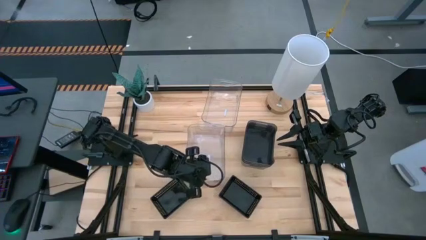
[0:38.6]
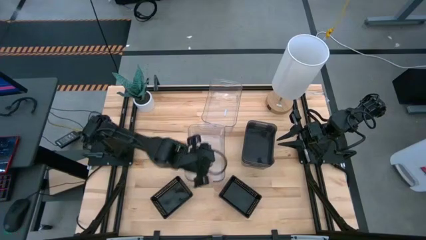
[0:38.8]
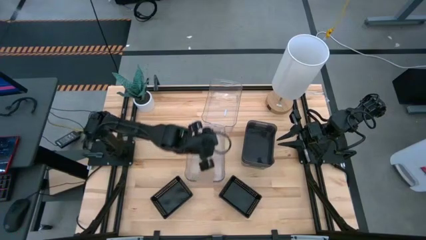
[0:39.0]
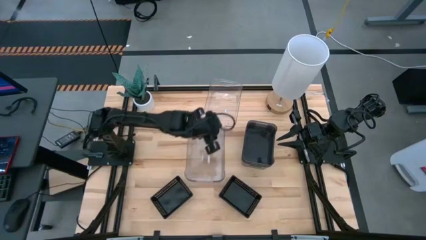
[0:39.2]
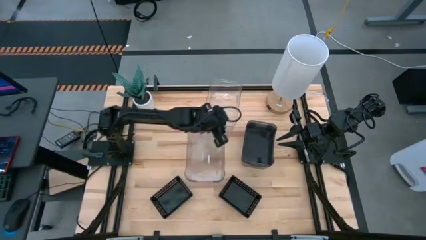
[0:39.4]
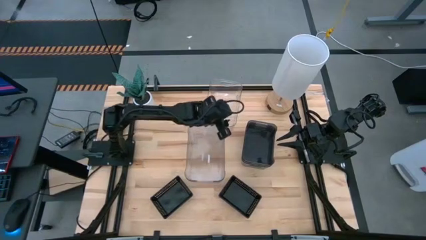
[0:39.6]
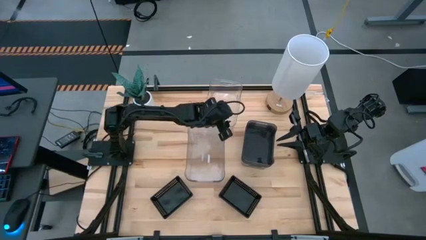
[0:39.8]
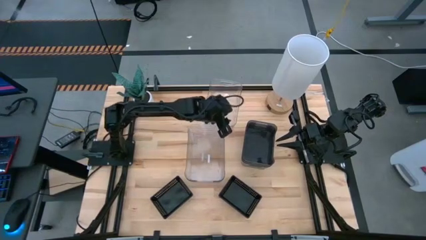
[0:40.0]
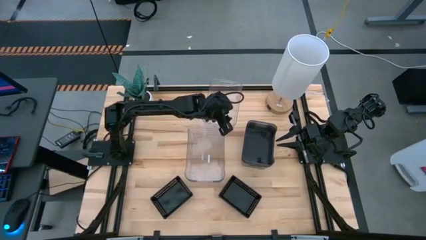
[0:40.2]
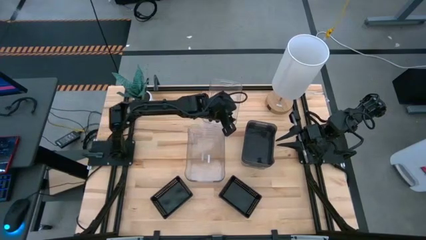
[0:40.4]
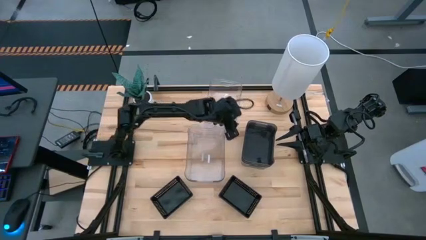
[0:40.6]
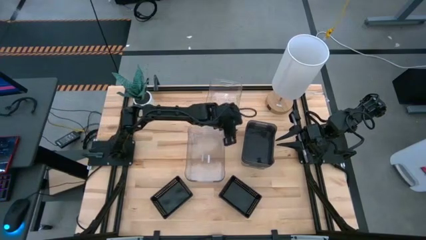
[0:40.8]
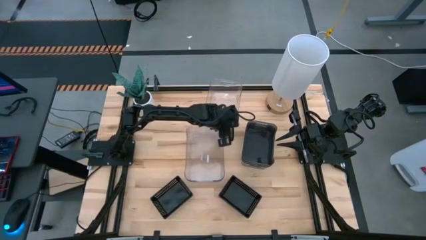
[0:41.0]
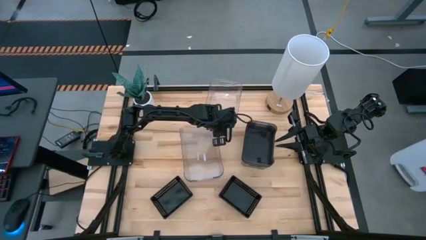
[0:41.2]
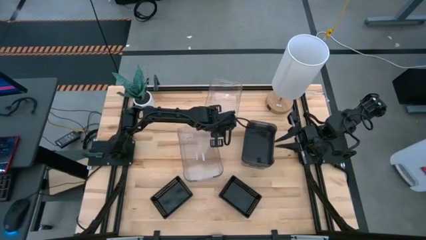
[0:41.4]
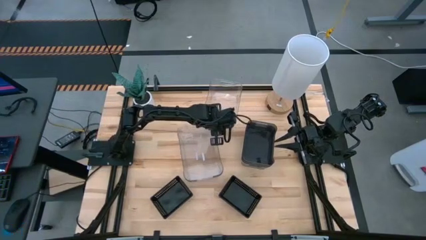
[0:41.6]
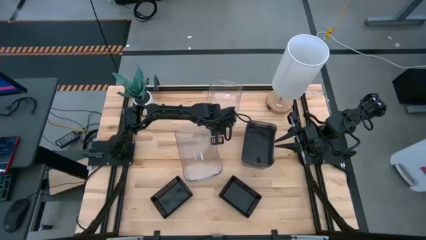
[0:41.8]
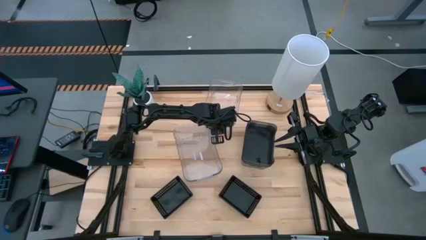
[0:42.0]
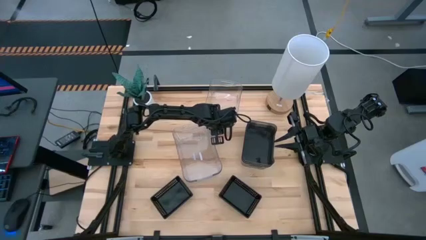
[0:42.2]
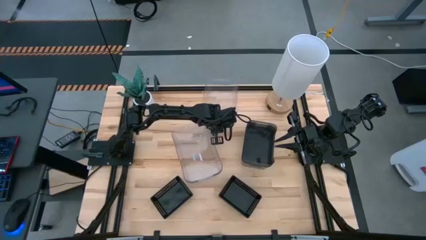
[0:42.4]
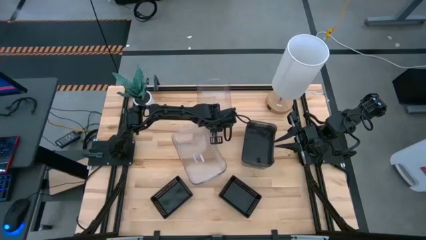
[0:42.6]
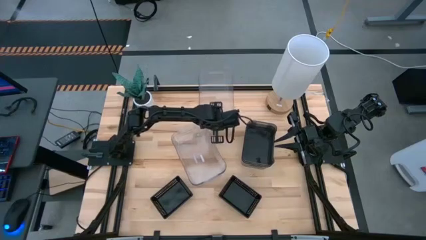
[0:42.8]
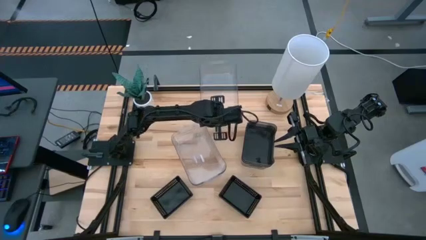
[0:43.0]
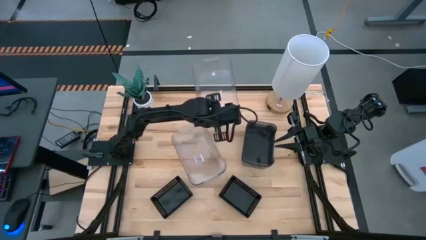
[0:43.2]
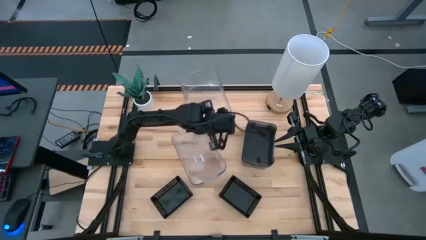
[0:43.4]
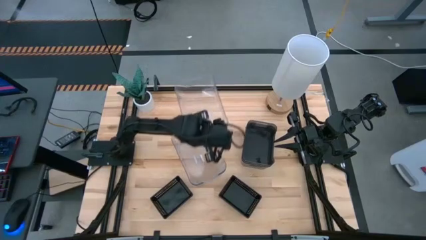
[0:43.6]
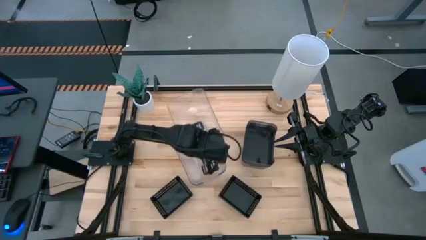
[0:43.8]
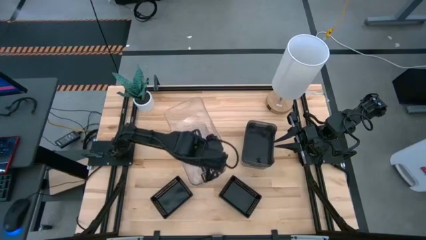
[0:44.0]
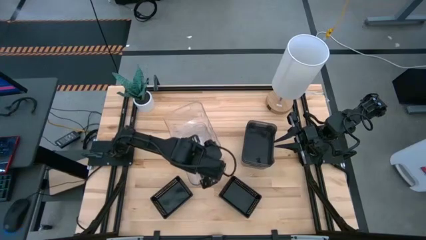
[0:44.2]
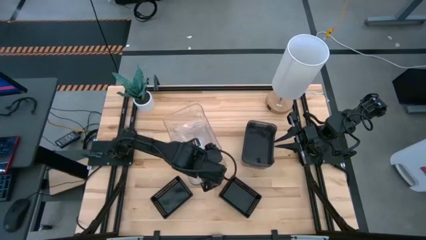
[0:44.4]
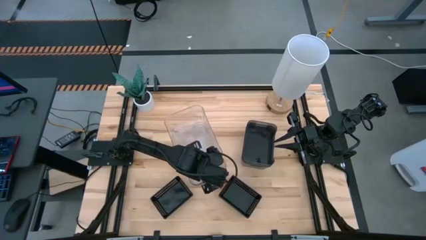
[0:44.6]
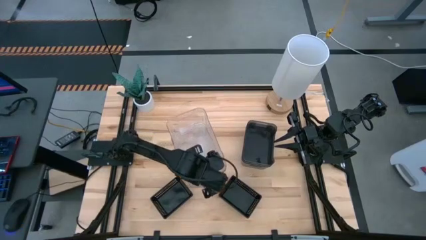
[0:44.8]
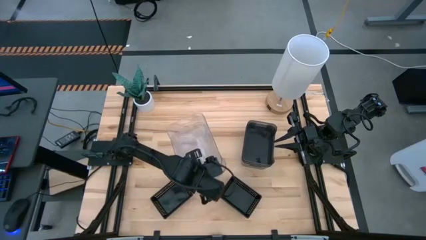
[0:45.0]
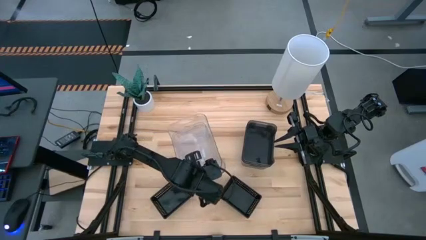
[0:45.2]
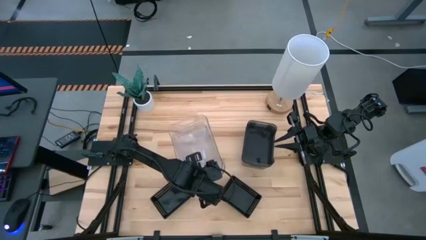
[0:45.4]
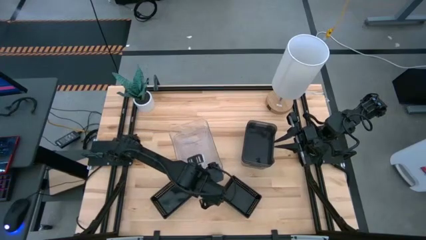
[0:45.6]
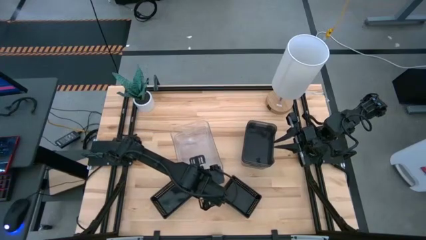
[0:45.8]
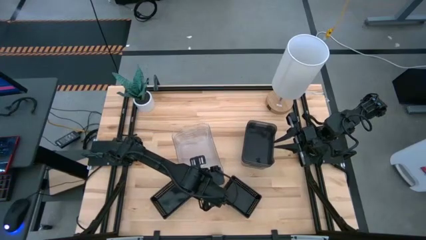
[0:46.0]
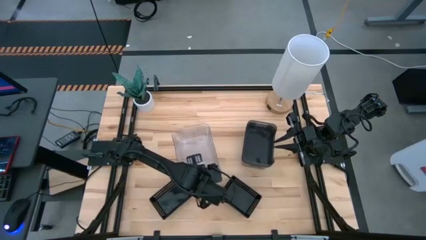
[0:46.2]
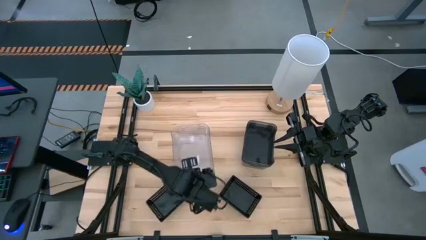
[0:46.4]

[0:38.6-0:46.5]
Stack the top transparent bin on top of the bottom transparent bin

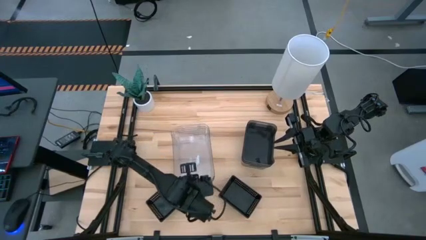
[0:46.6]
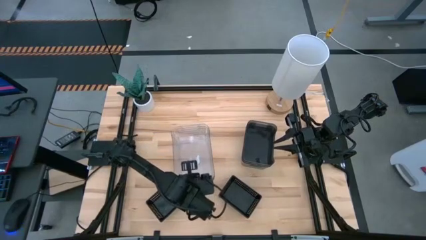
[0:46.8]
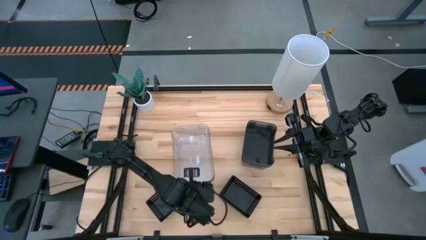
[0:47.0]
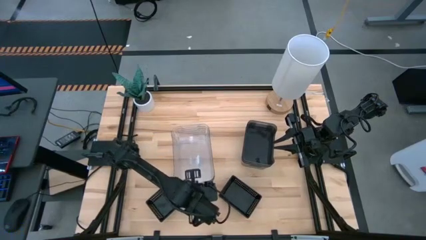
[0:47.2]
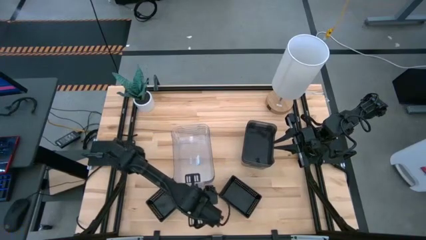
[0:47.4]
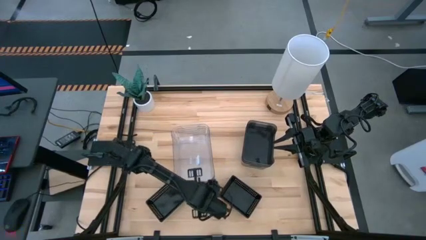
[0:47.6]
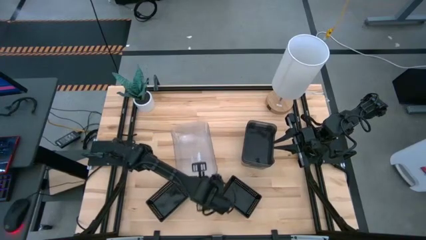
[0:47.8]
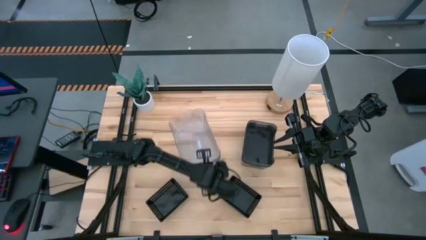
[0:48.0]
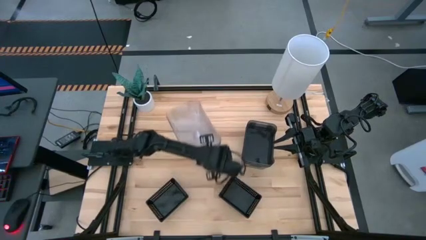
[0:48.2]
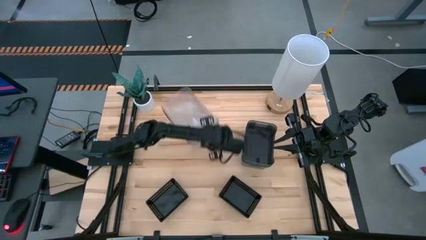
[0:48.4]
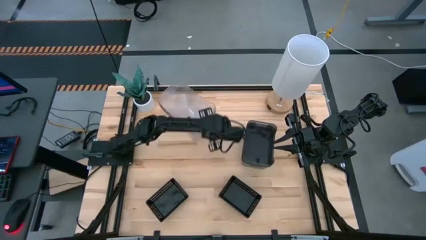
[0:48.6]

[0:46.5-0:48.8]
Adjust the transparent bins

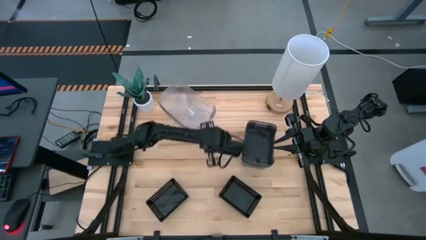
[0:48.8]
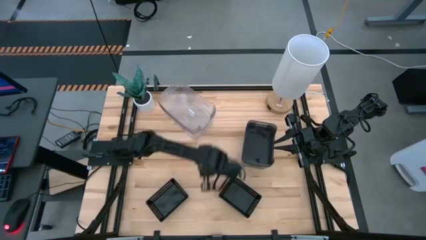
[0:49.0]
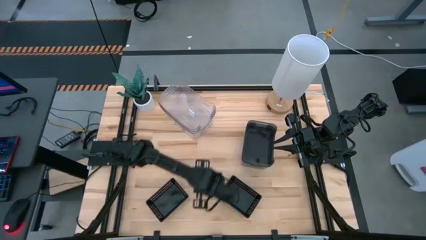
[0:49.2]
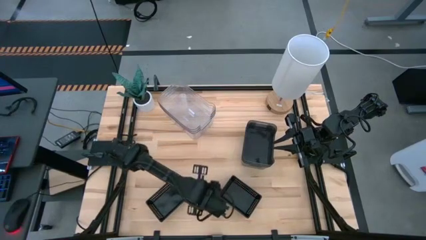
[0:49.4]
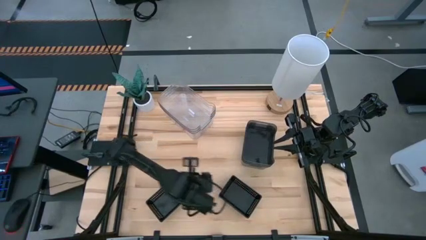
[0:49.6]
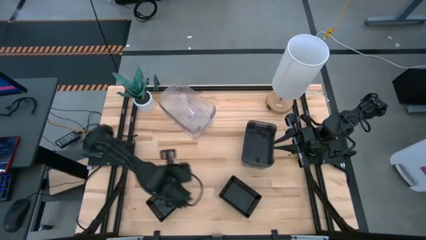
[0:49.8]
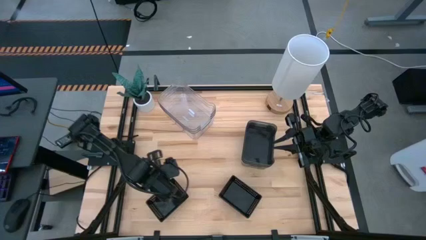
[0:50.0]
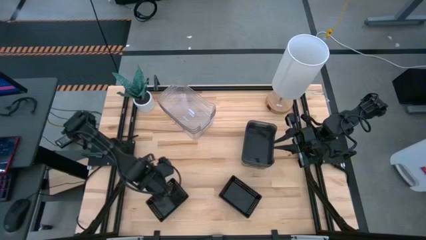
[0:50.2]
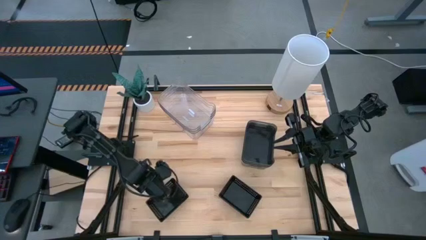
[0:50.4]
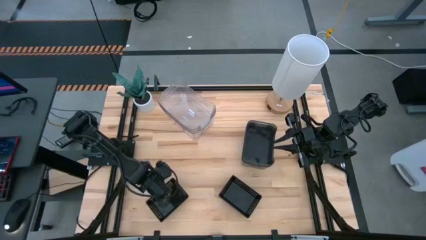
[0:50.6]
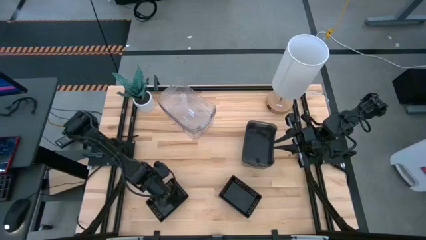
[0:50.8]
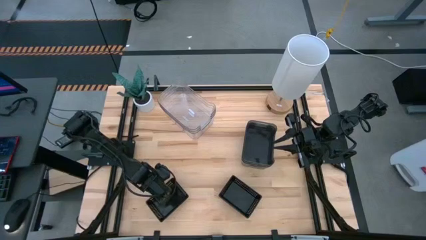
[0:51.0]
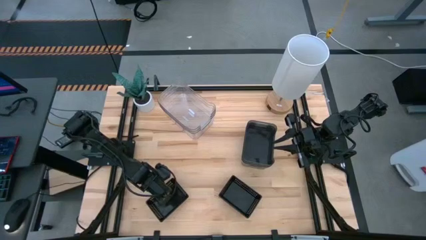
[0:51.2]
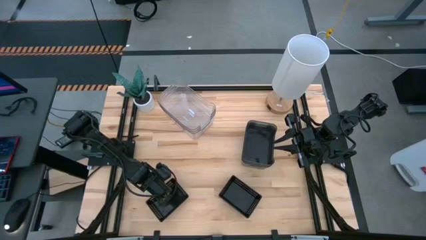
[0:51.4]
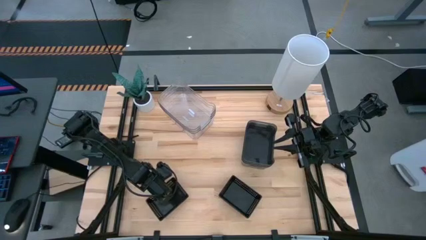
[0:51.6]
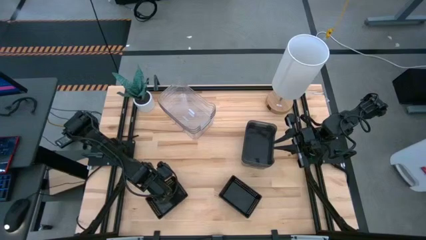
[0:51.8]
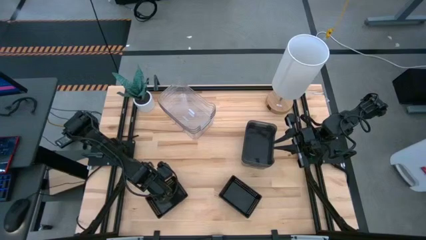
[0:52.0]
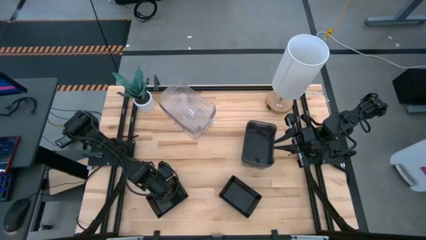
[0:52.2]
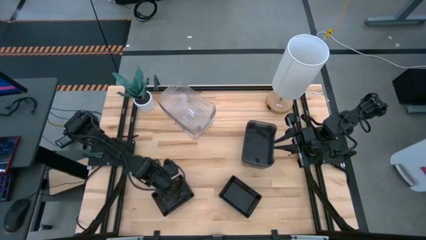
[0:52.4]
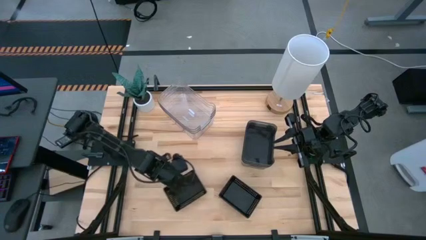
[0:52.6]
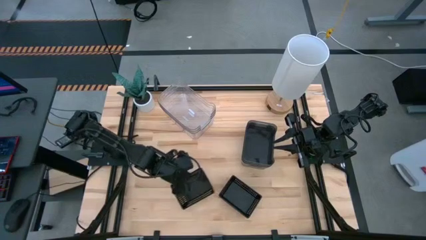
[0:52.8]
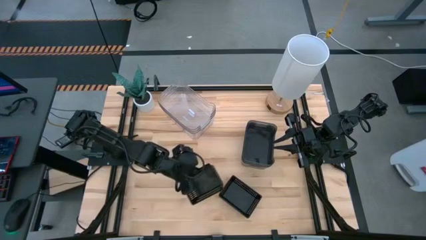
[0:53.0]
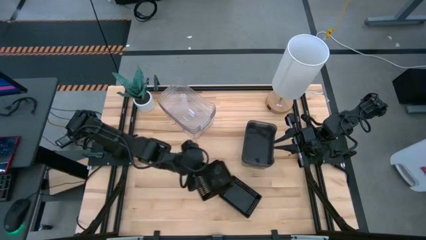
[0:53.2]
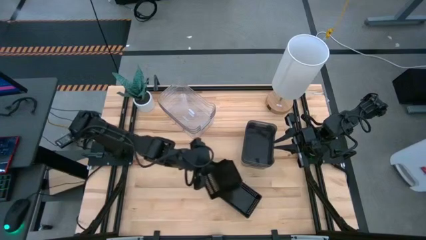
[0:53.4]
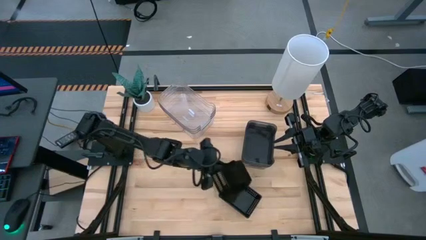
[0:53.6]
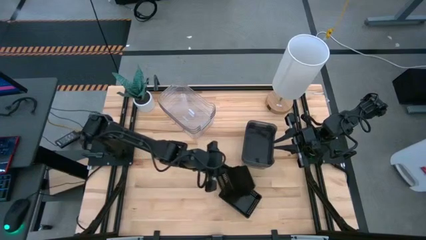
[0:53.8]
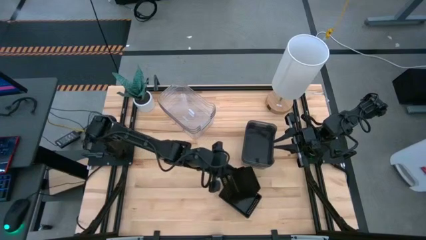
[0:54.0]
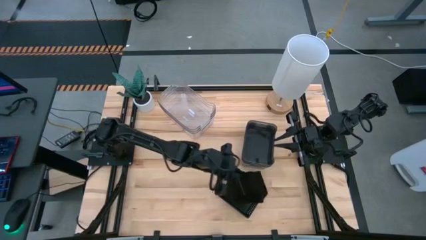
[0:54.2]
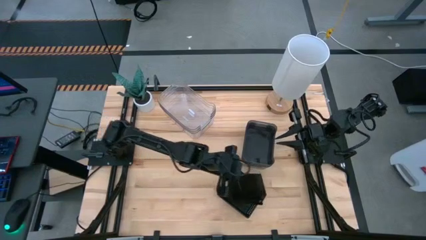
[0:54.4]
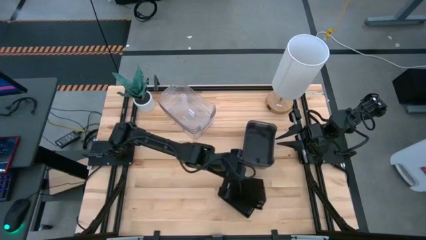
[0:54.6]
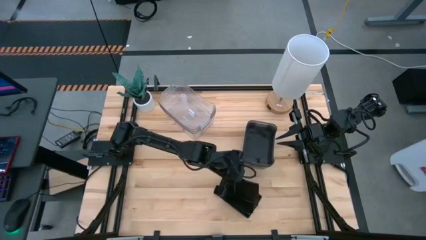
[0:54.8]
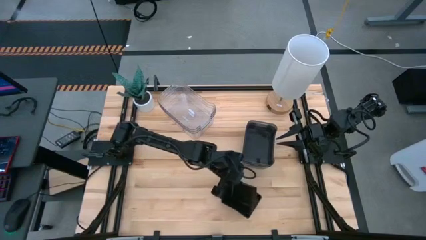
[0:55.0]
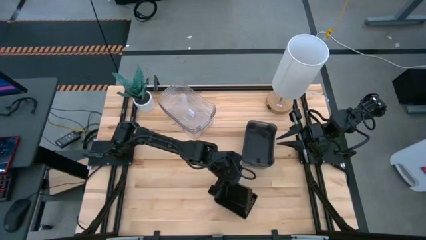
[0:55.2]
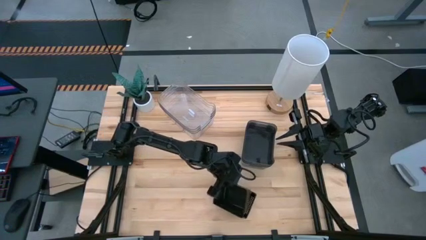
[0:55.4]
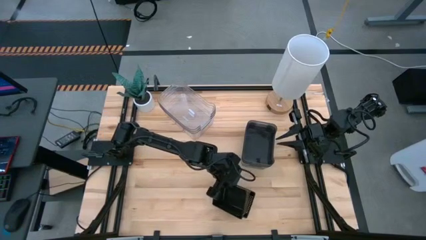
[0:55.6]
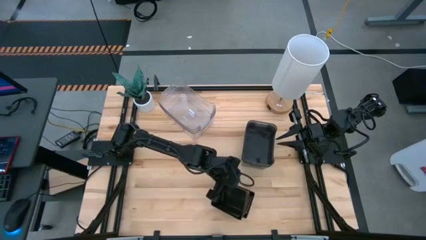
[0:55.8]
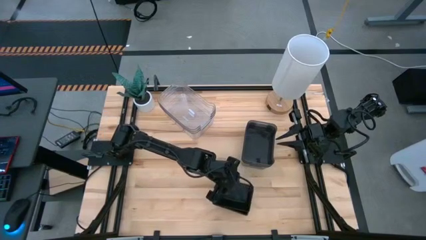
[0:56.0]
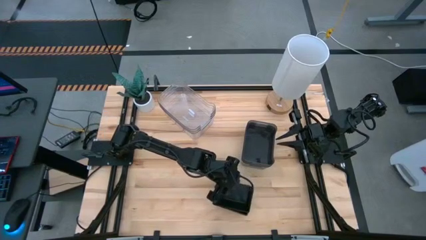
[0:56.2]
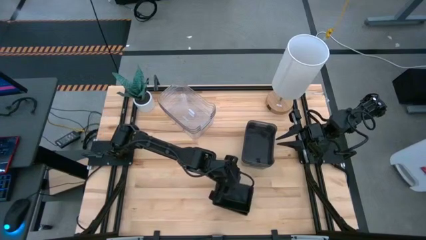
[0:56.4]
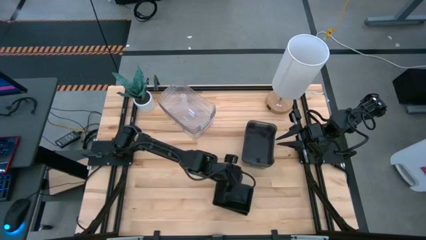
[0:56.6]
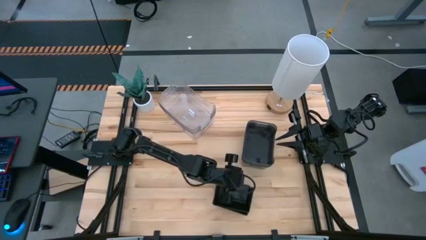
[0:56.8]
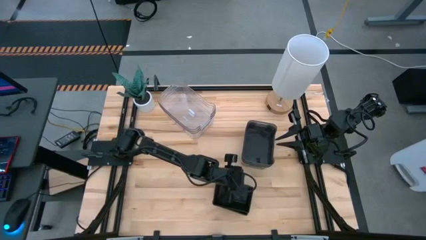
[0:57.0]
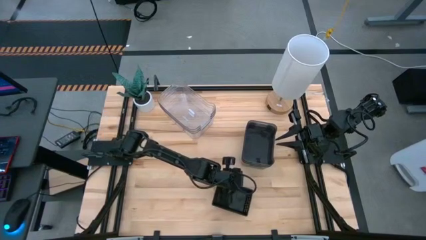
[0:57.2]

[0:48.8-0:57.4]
Stack the left black bin on top of the right black bin
